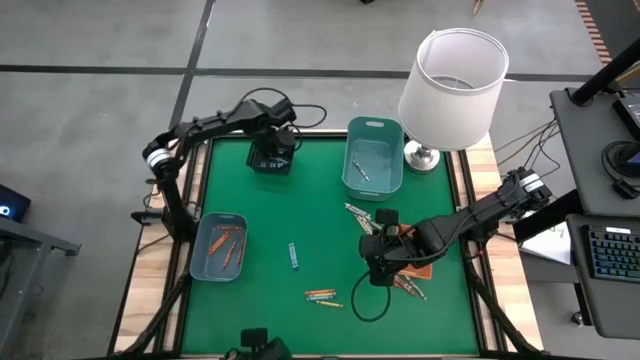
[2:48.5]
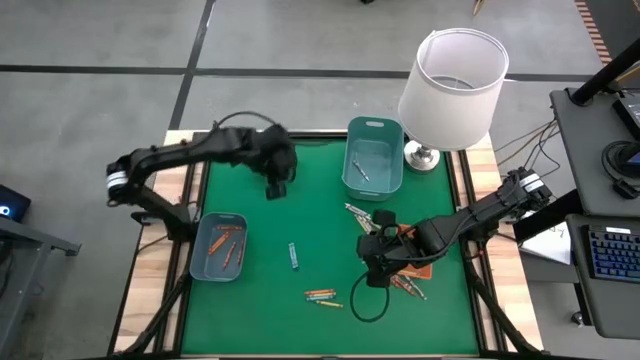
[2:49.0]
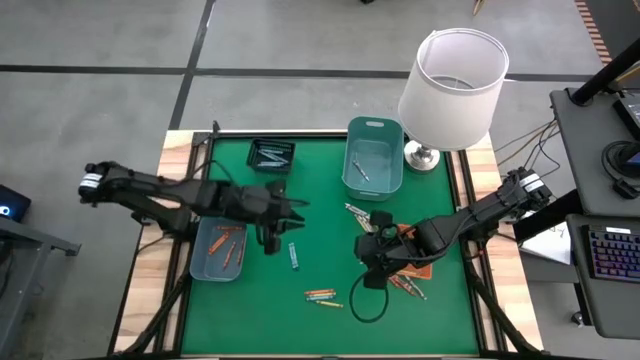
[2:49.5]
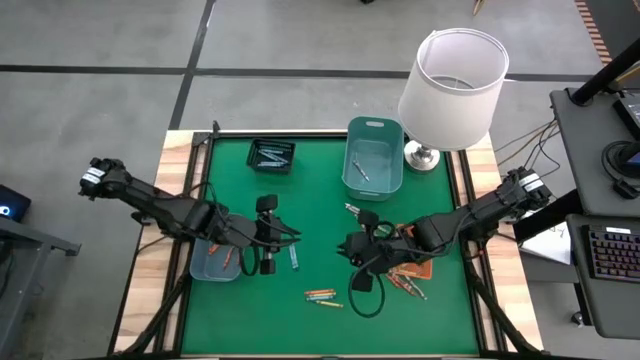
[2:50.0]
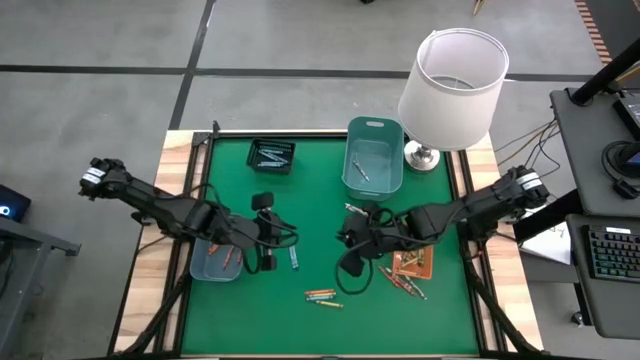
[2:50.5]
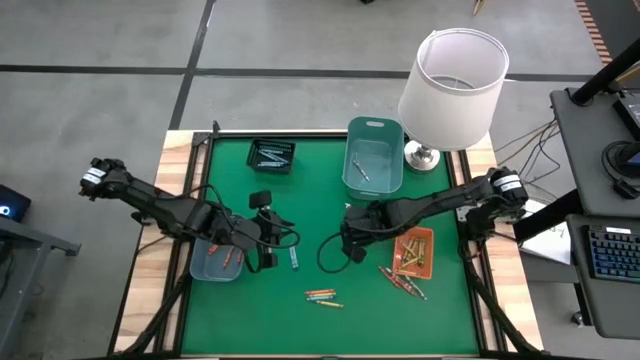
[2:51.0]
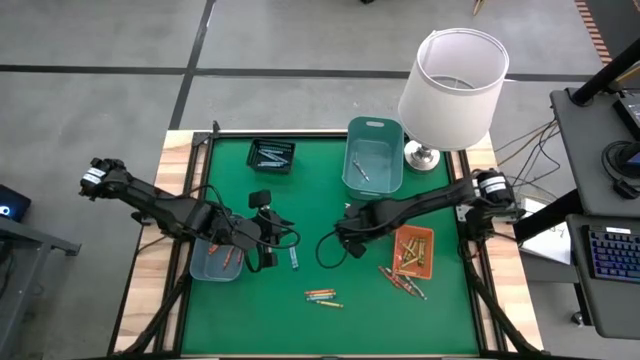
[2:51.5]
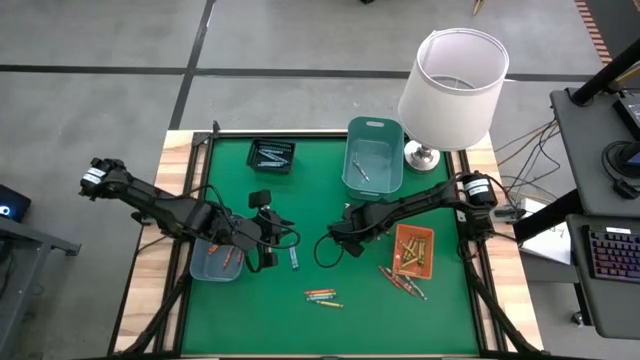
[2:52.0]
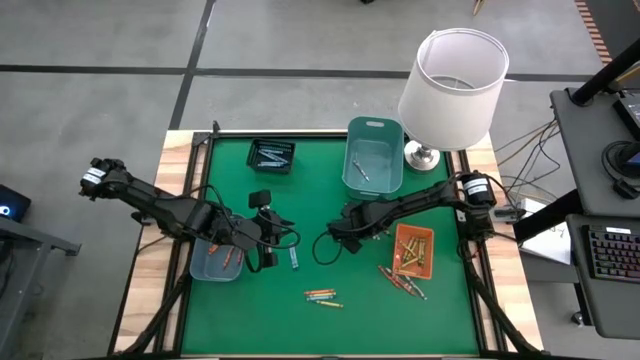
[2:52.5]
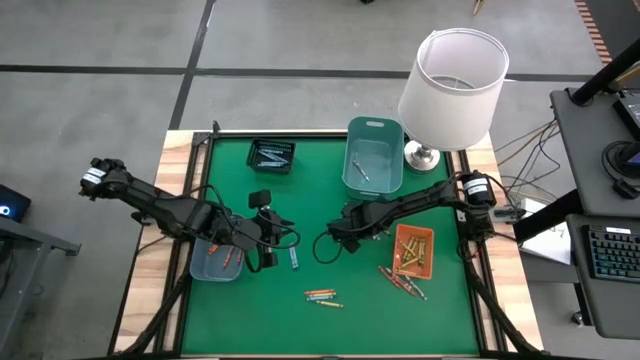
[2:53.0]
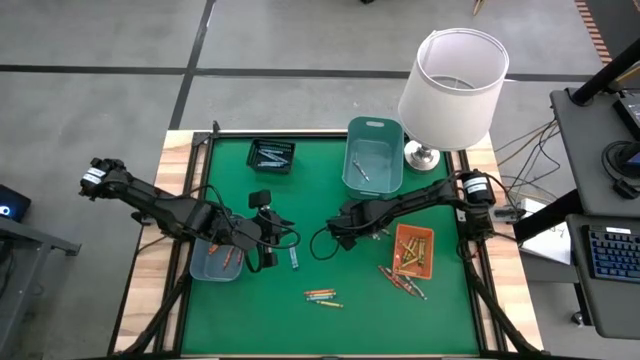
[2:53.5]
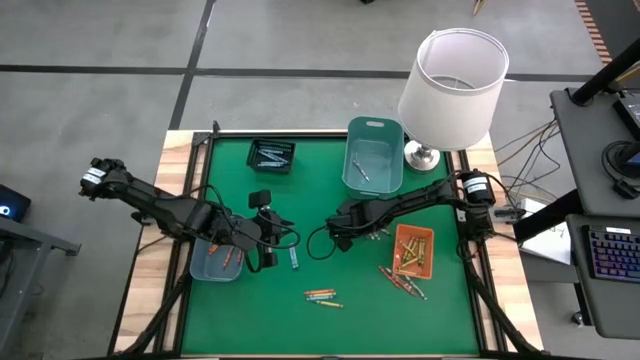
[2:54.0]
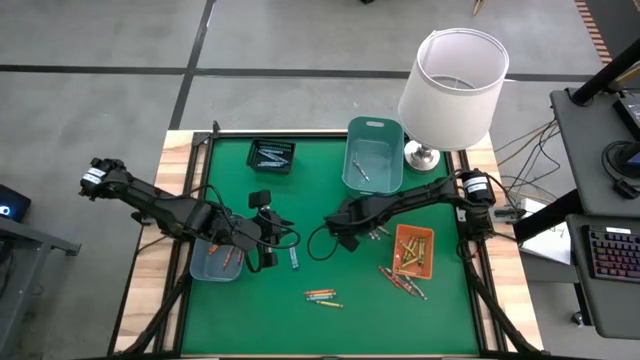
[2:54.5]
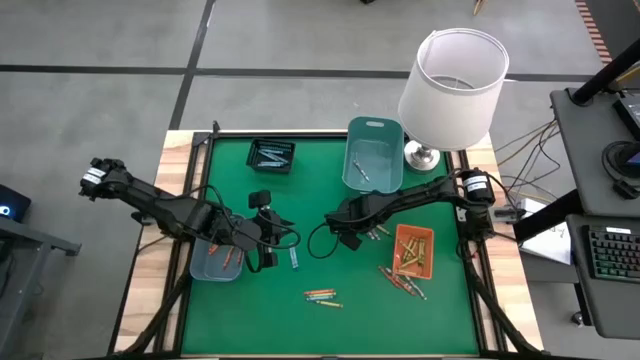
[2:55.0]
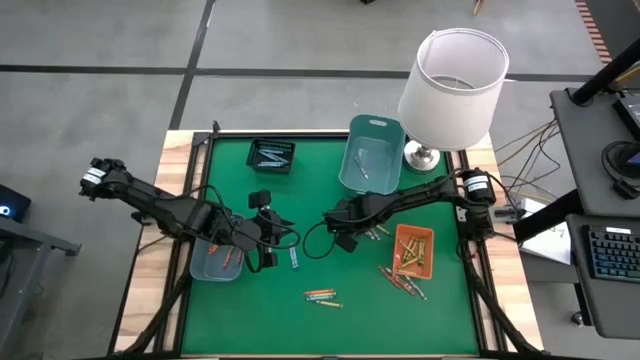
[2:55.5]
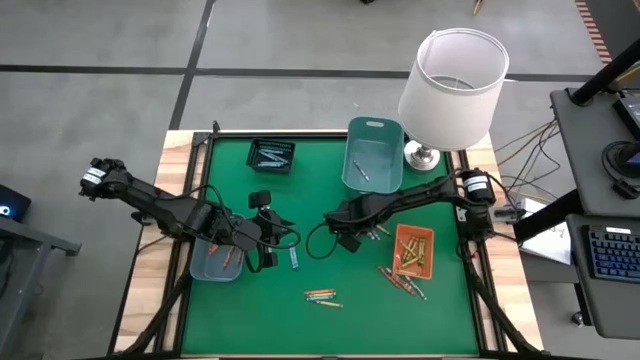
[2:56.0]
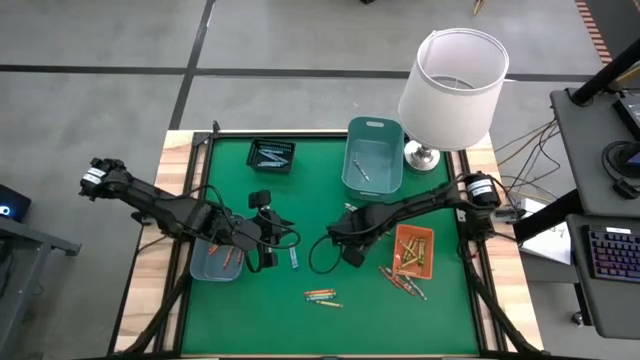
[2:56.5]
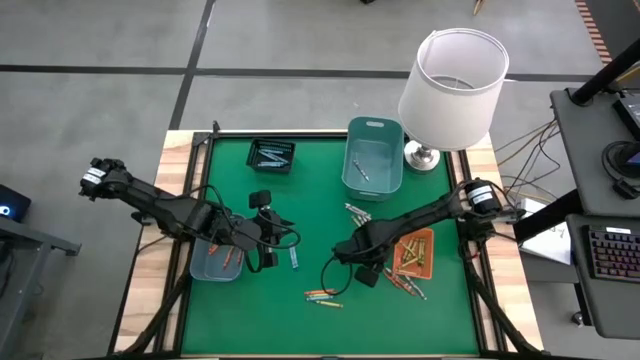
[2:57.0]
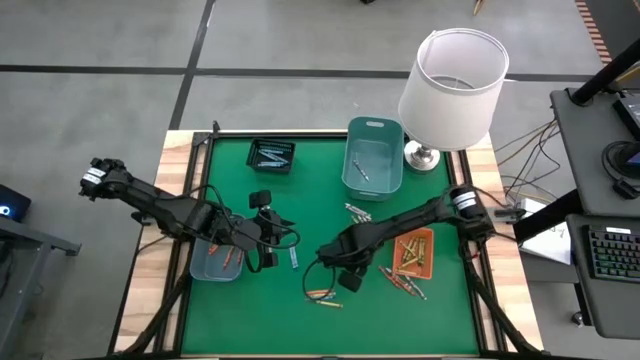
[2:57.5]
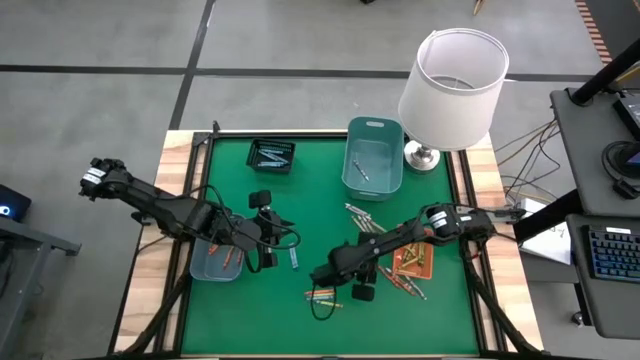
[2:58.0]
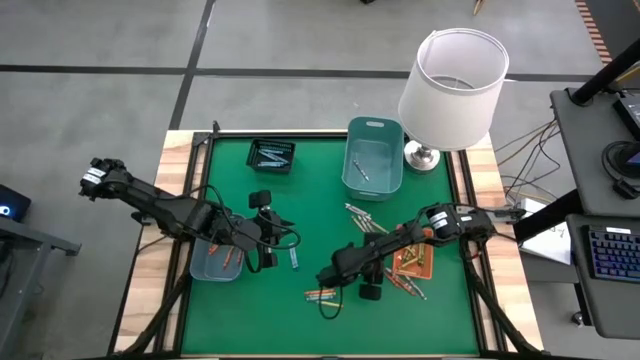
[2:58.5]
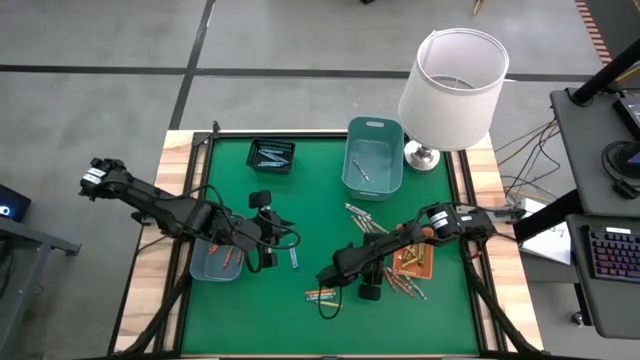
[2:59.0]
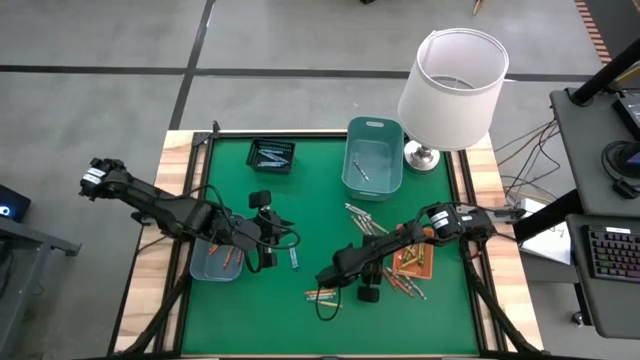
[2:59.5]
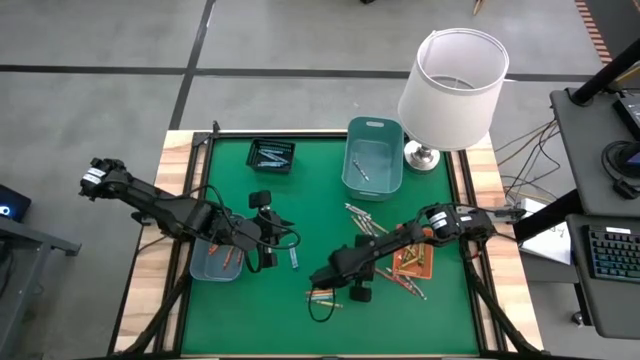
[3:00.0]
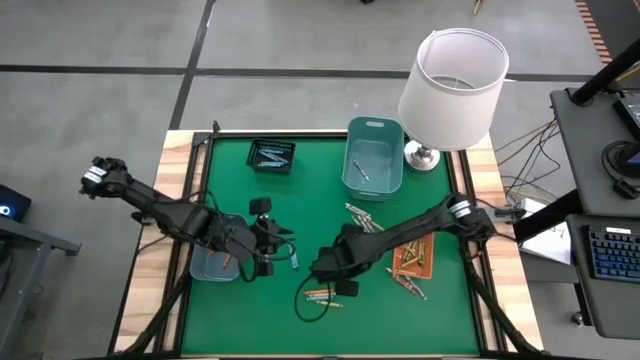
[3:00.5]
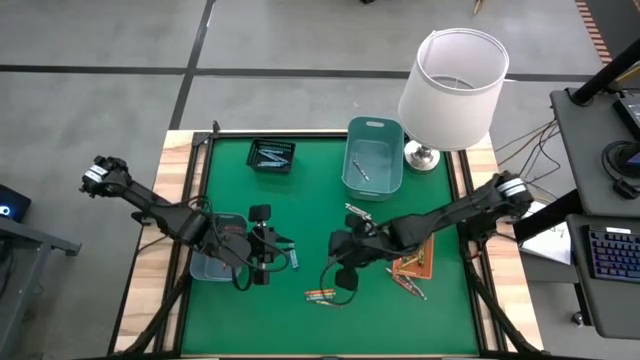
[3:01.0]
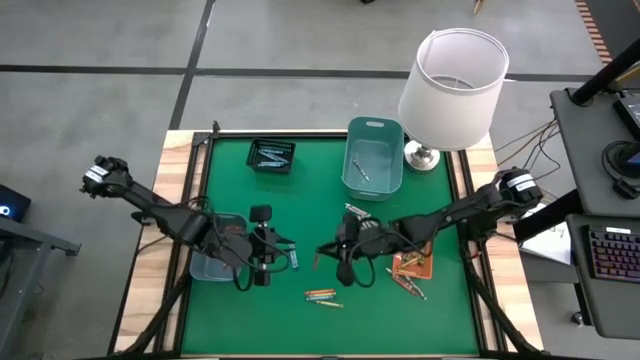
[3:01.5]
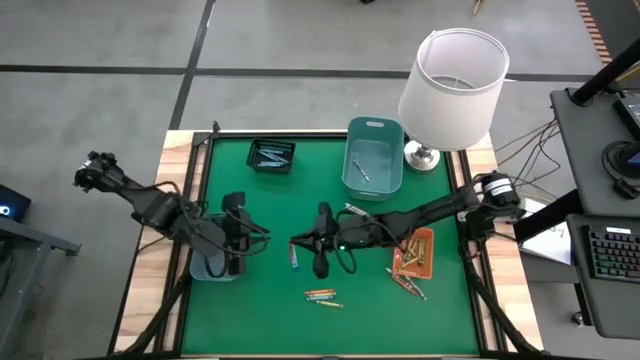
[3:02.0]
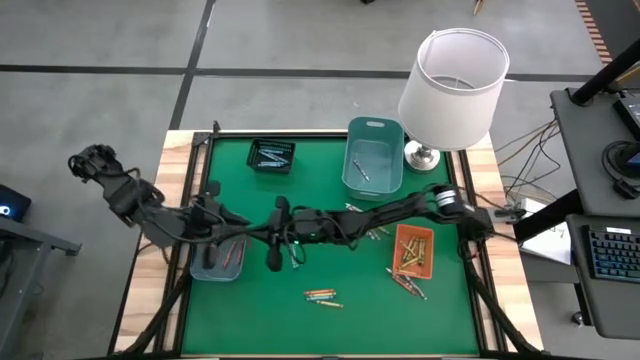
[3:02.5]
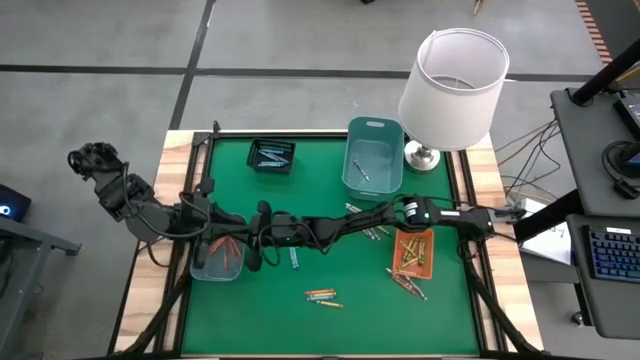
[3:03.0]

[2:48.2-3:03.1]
Task: Sort crayons
Put the orange crayon into the blue bin

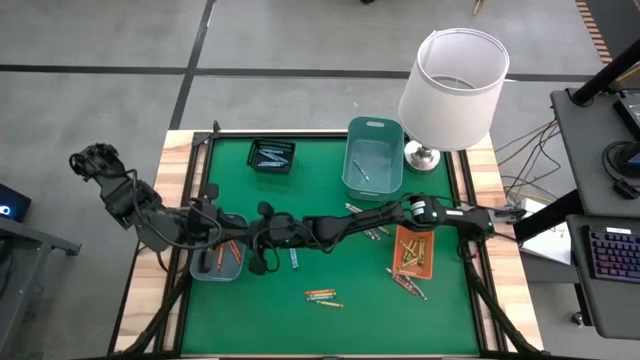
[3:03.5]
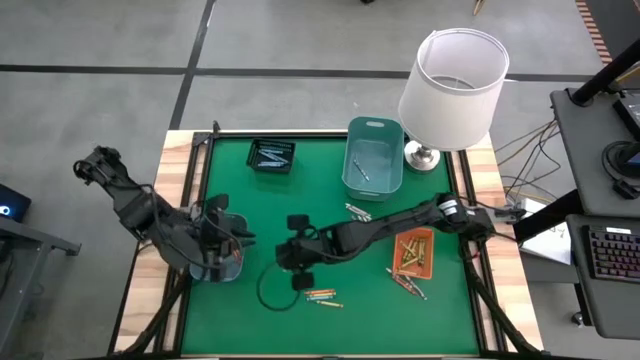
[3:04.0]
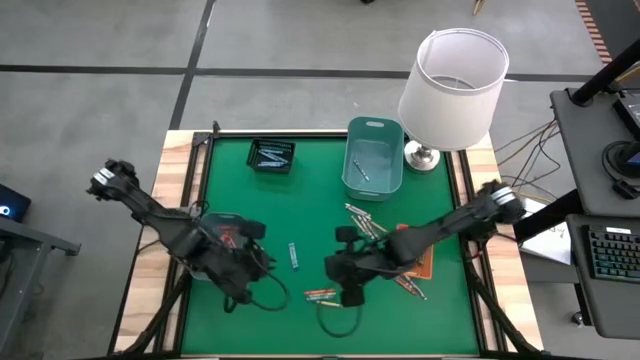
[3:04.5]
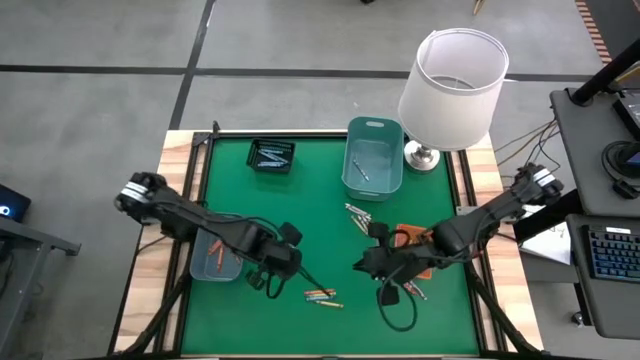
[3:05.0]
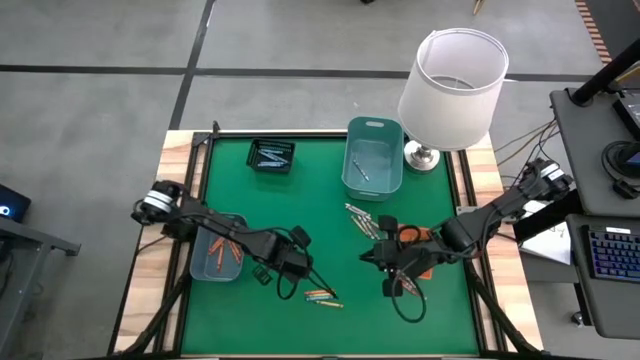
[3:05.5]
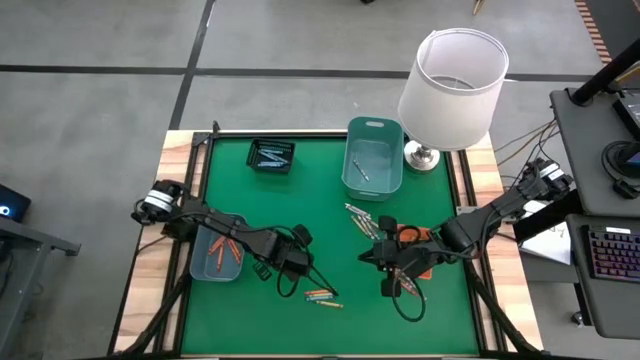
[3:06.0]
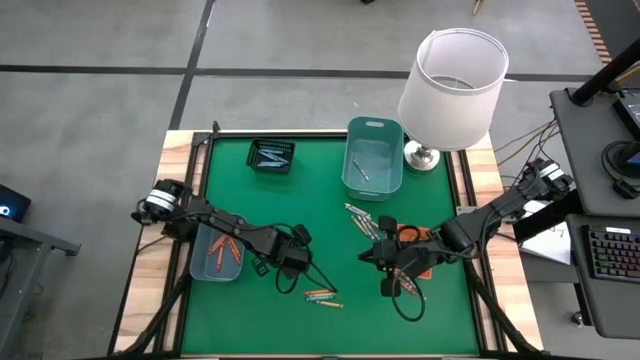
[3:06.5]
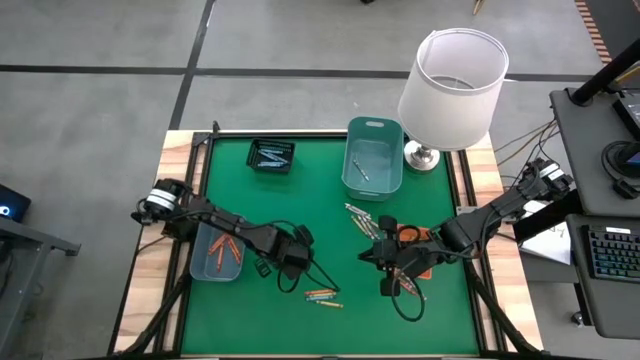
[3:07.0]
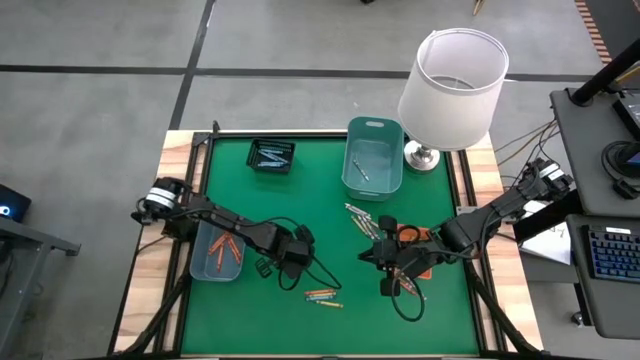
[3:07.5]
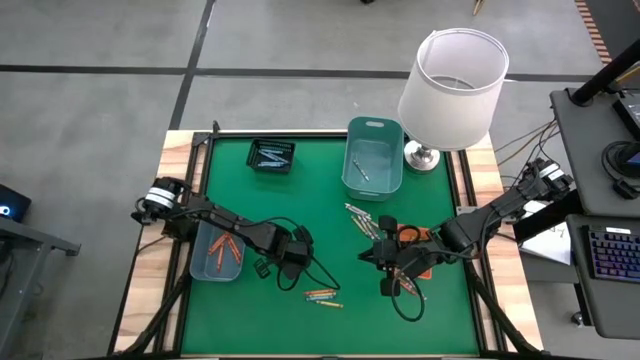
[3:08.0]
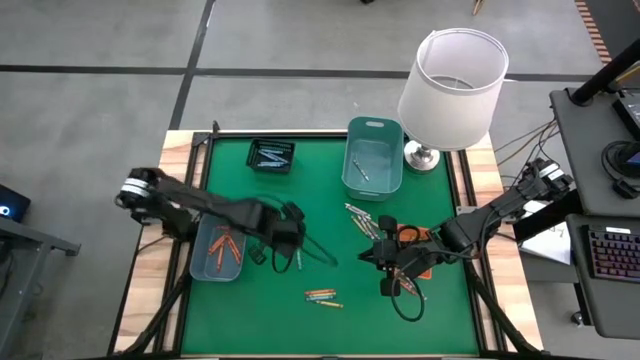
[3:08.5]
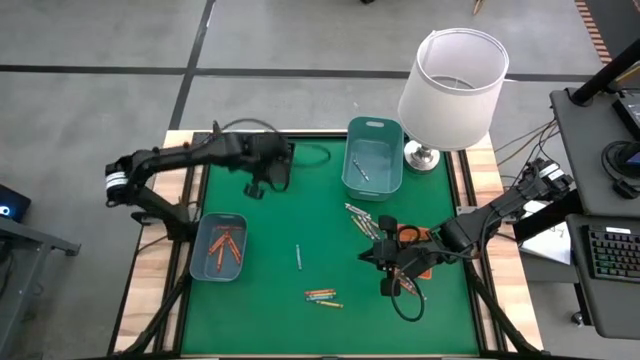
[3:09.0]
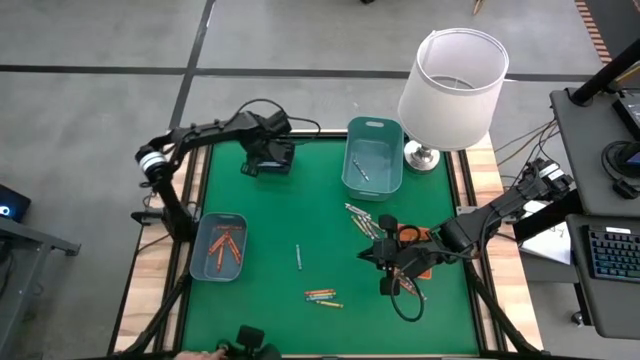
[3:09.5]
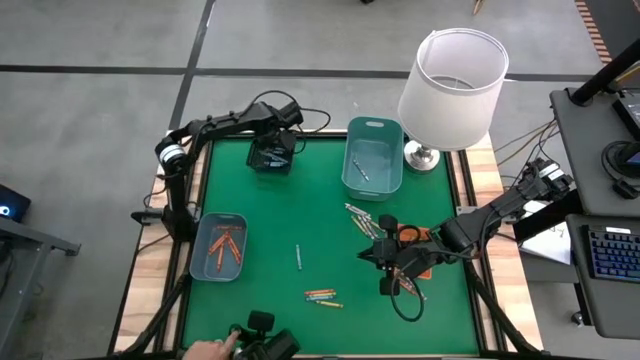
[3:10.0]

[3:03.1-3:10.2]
Put the blue crayon into the black bin
